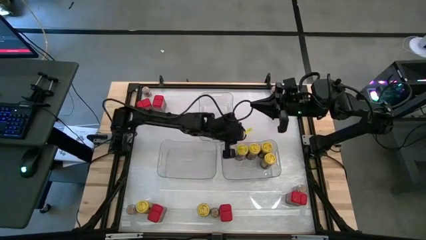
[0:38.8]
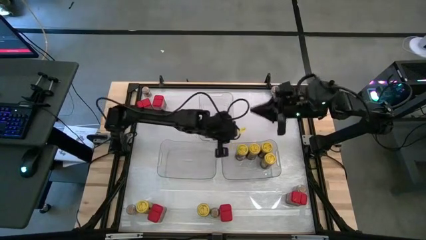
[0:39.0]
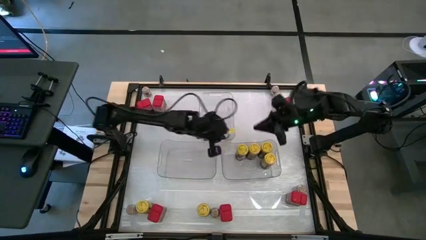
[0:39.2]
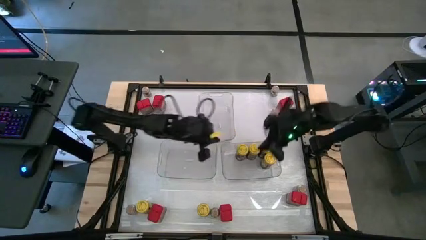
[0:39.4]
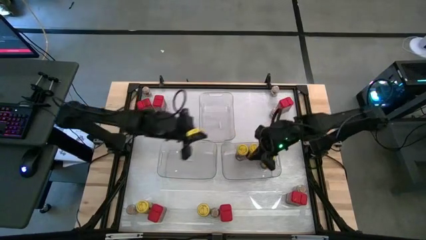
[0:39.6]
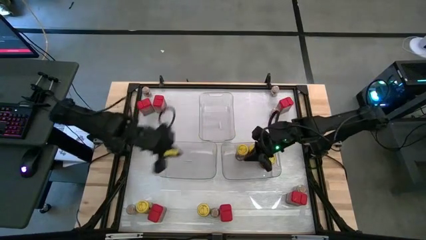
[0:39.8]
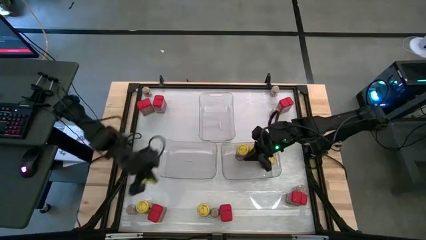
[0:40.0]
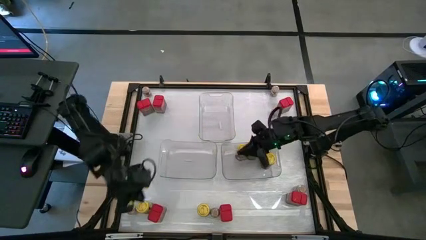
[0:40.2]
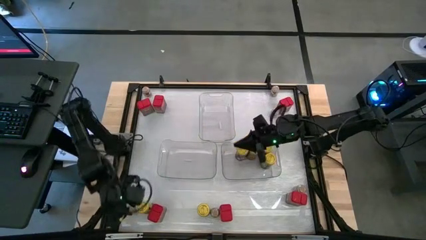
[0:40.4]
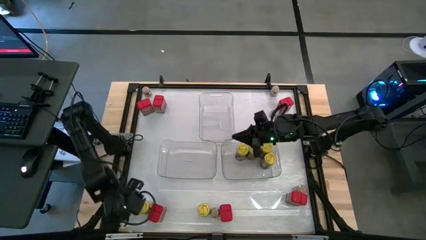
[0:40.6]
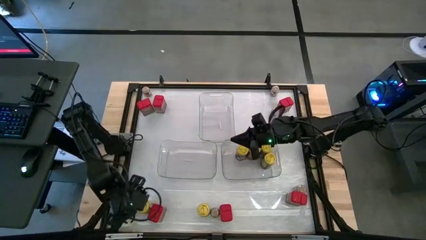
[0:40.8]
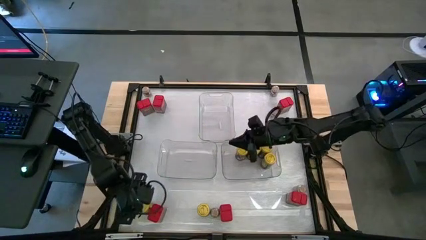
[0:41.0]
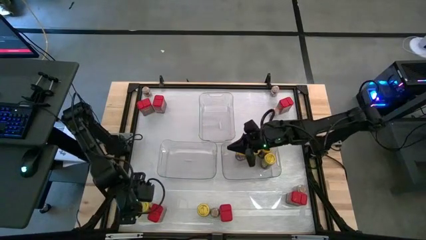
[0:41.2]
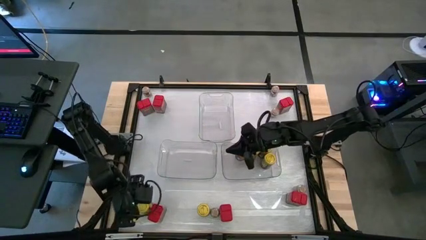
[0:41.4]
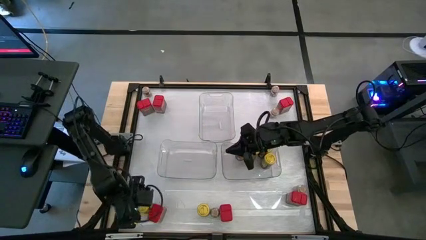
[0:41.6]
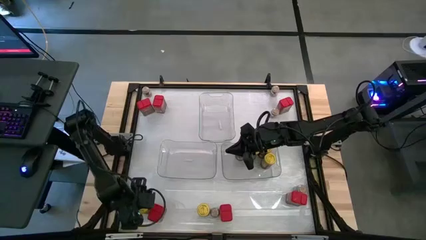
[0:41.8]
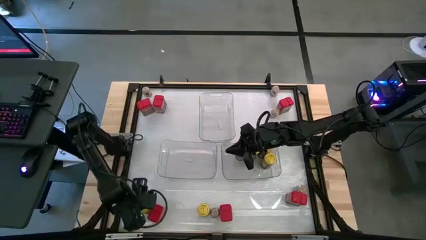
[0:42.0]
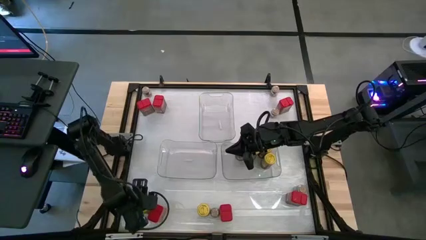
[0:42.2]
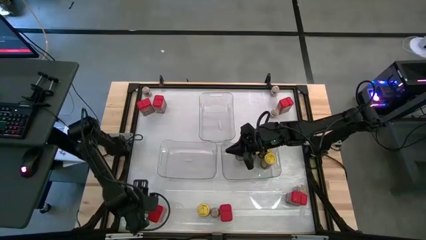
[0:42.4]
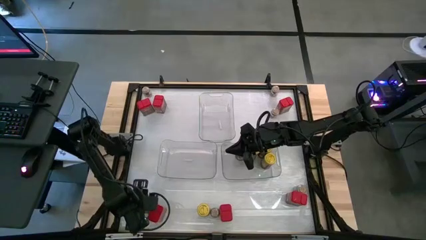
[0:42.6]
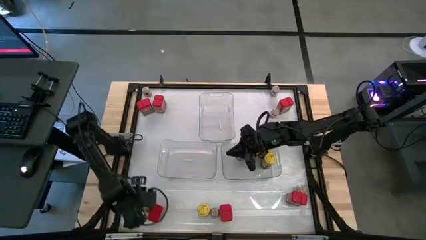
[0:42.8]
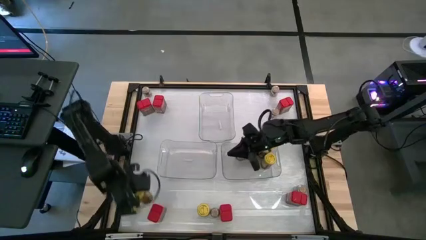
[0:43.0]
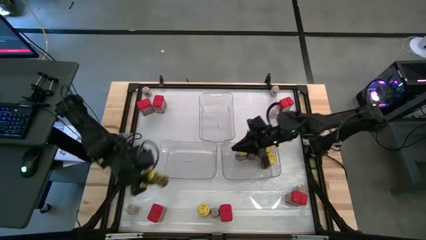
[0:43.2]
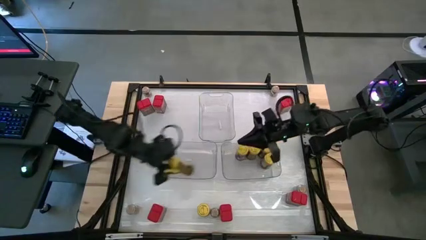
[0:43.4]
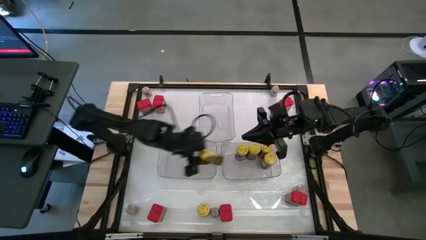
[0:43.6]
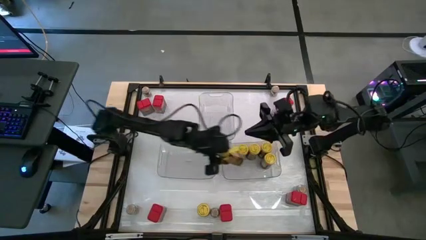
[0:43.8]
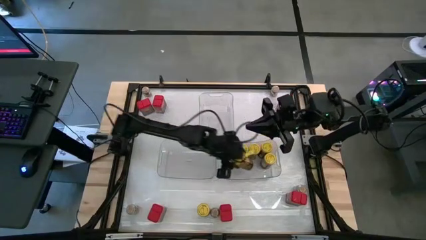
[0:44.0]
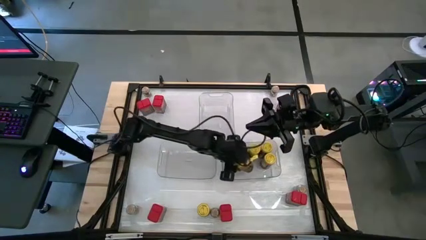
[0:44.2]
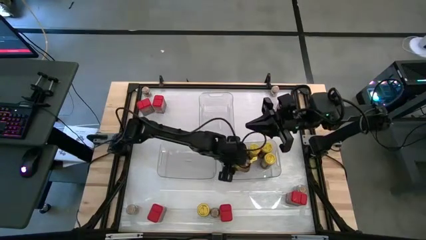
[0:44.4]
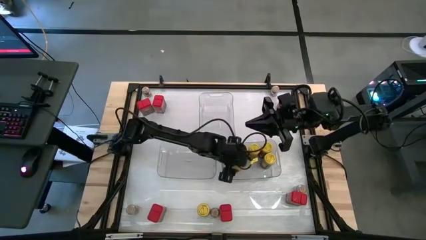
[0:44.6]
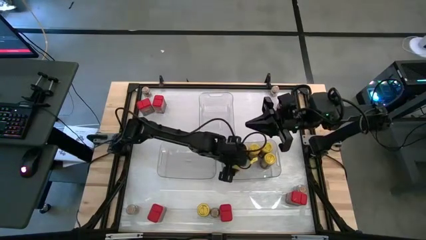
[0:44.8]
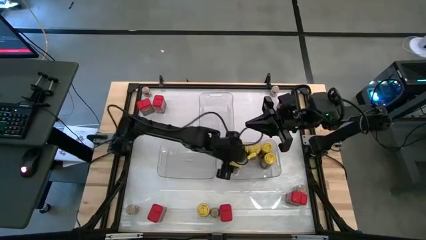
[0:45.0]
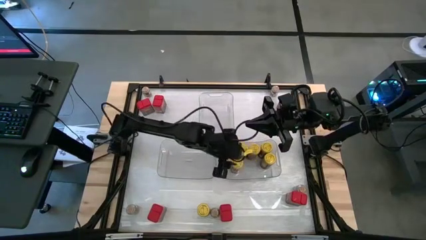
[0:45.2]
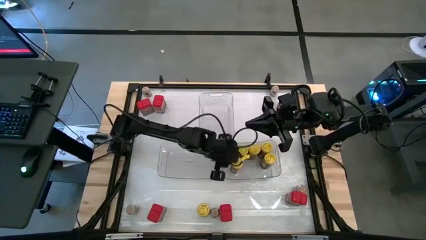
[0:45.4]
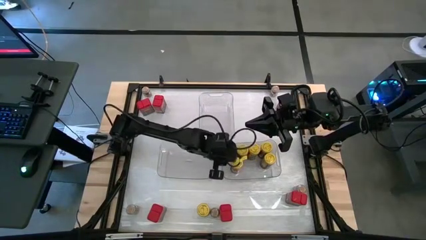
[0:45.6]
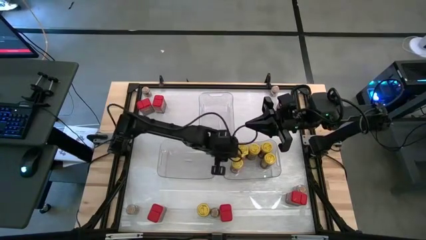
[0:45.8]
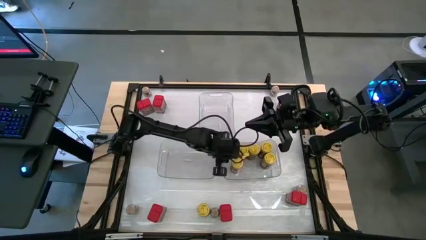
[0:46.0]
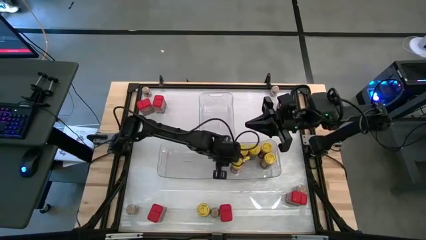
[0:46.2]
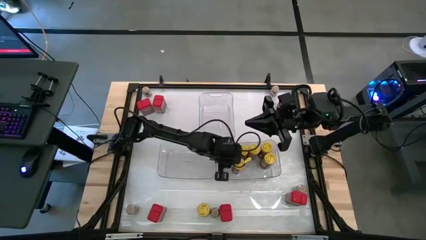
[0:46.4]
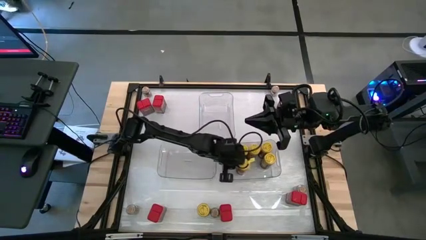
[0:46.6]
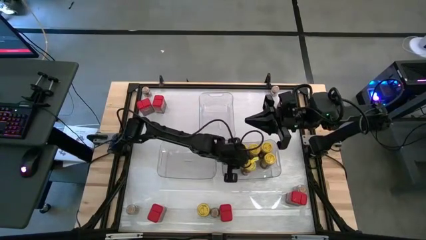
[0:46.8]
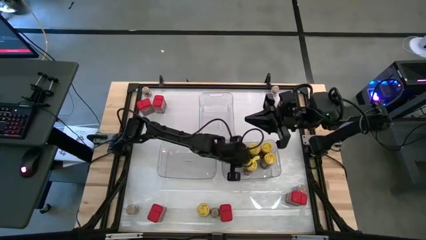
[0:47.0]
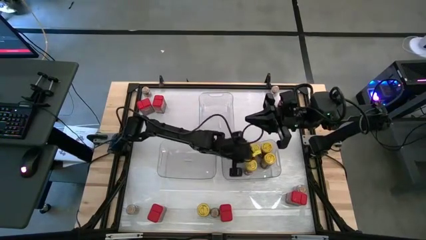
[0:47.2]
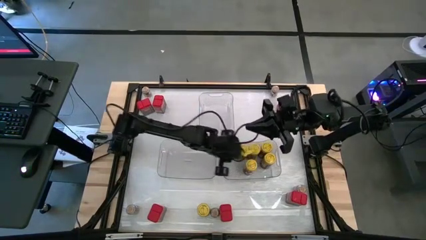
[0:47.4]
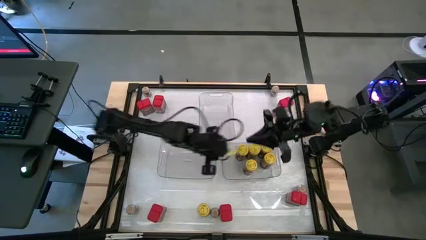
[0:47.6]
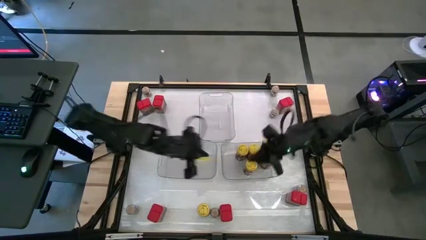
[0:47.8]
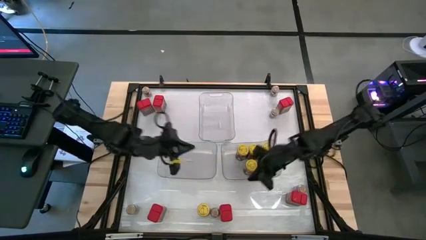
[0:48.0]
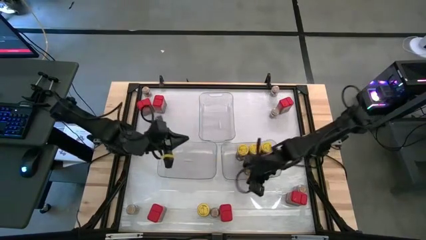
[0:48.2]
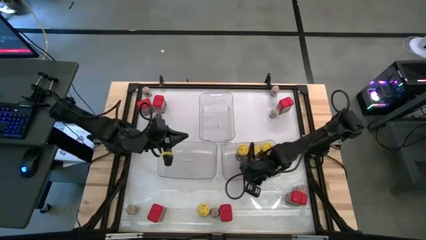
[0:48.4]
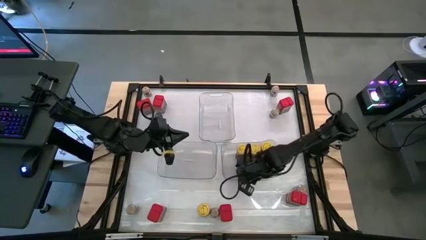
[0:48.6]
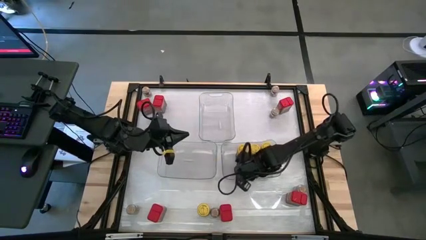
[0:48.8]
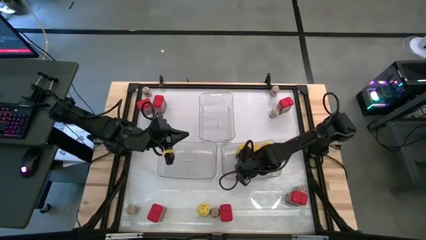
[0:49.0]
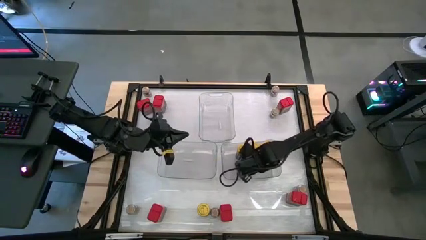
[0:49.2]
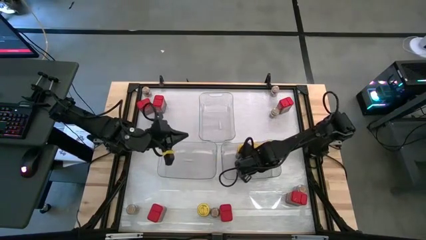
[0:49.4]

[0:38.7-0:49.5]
Task: Sort spices by type
Put the yellow seasoning bottle into the bottom right transparent bin
